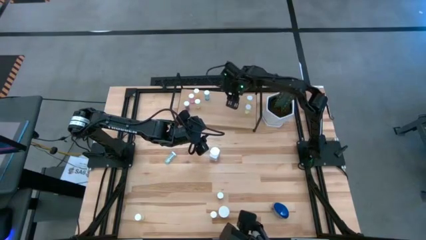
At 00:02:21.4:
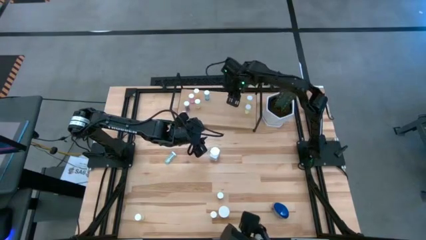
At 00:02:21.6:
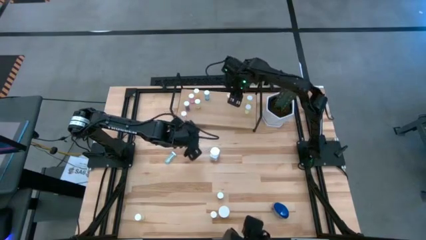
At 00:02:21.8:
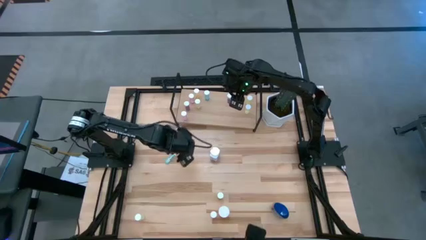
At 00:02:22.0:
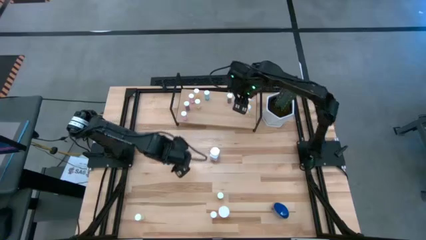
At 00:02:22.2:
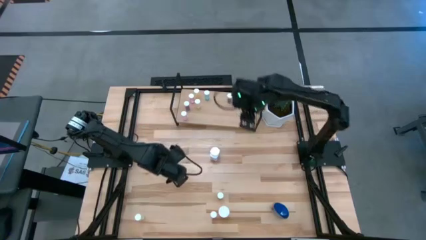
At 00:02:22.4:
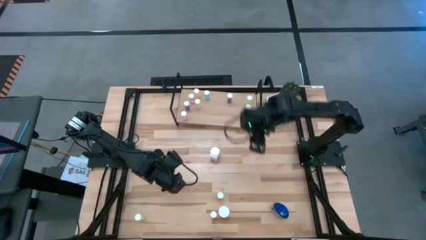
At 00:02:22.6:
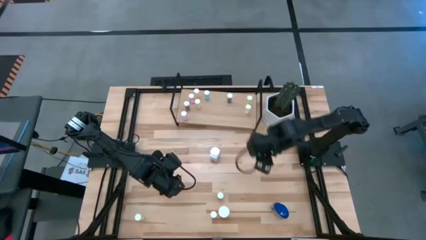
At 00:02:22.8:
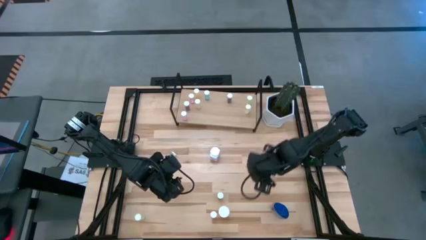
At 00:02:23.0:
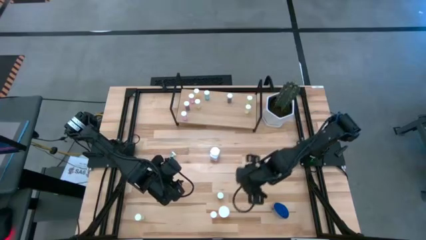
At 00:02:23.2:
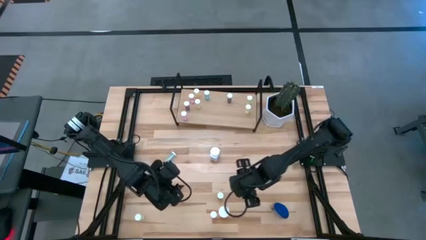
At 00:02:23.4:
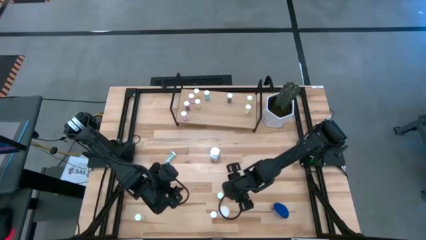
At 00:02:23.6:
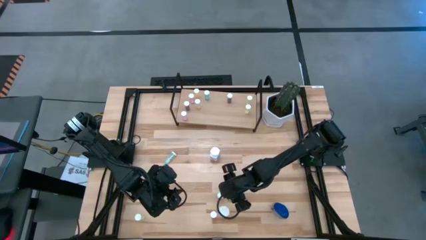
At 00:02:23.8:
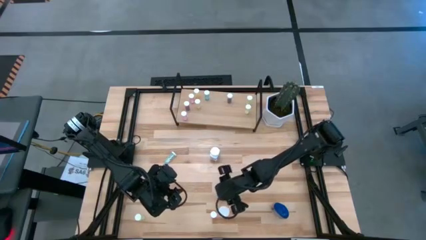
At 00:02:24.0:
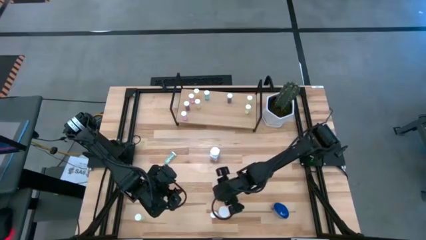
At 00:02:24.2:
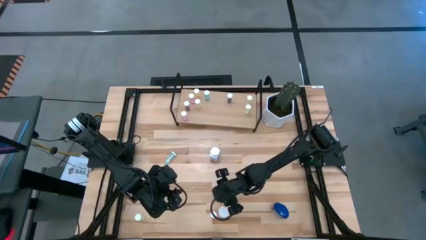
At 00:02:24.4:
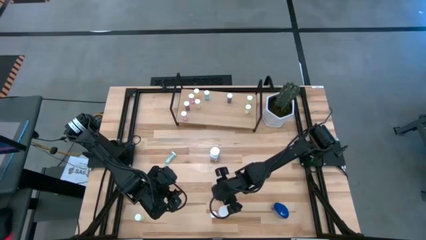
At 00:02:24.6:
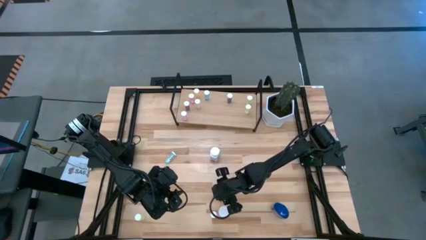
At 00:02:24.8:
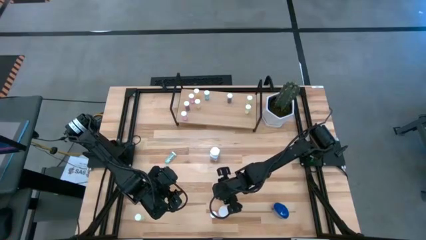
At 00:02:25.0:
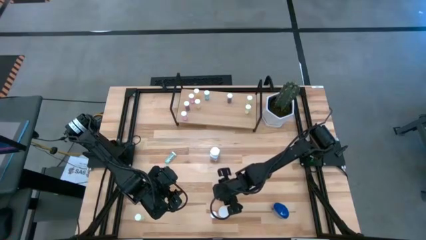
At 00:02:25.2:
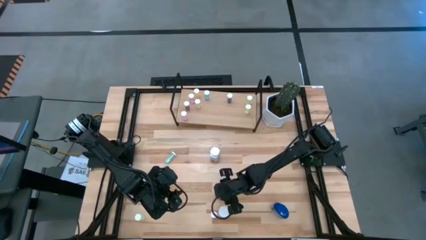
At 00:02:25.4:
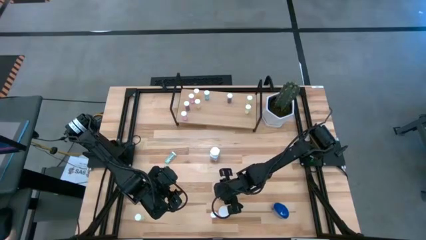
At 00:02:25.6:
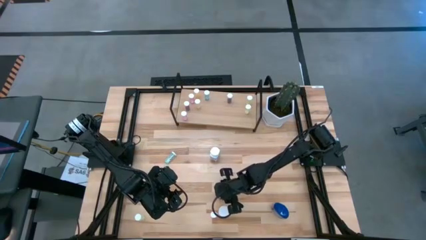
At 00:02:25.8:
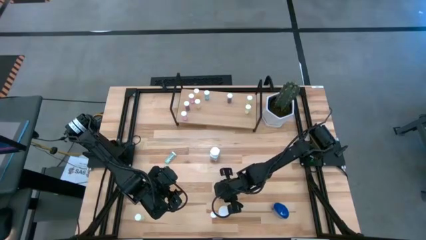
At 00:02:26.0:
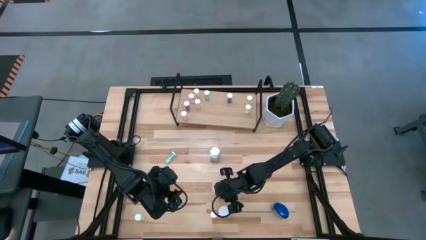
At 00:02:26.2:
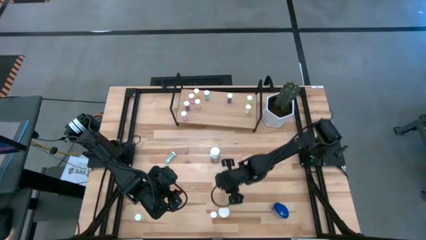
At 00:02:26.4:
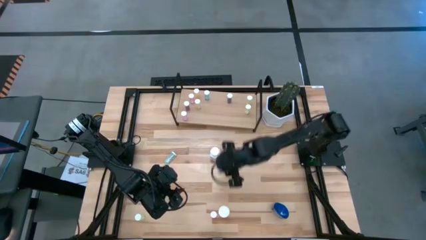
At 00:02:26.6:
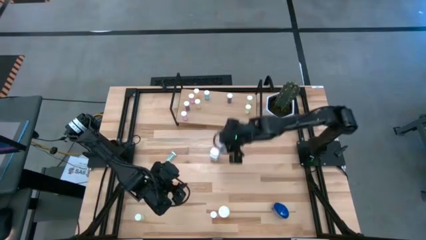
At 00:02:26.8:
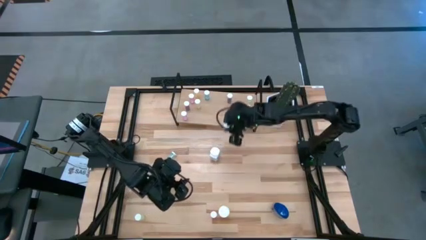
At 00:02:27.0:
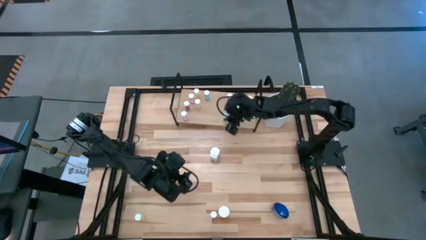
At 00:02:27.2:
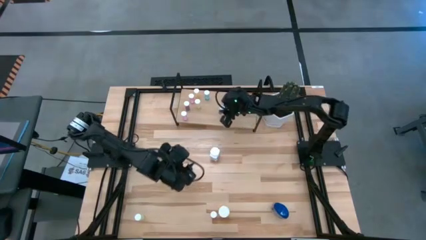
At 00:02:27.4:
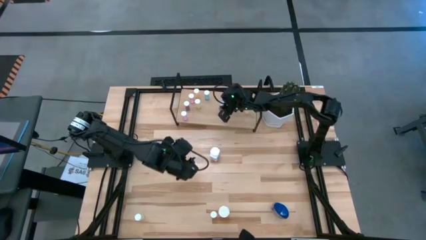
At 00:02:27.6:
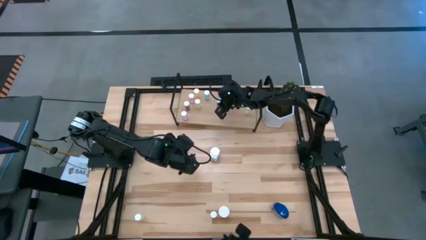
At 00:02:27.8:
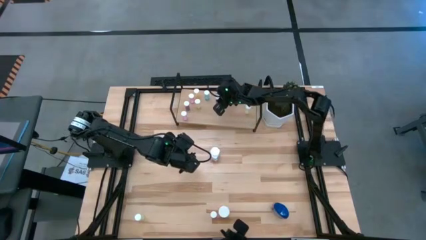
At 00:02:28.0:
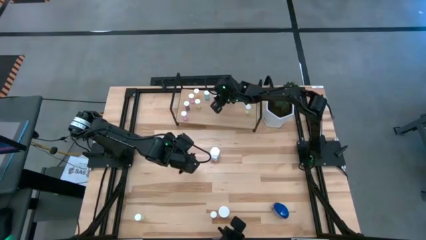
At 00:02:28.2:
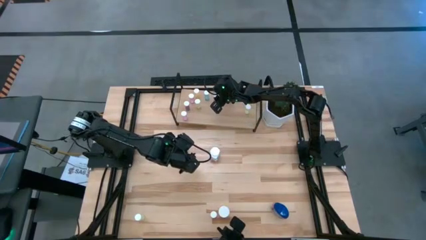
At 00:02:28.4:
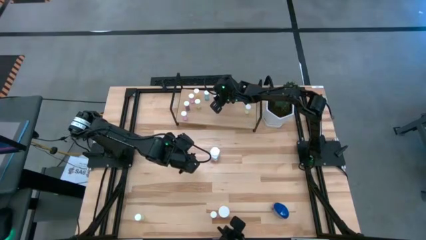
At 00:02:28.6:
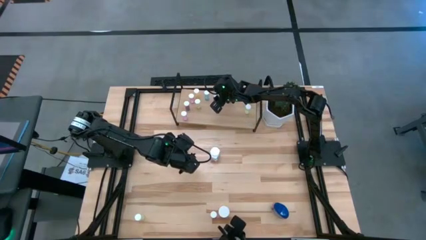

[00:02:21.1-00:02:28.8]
Task: Pick and place medicine bottles onto shelf by color
Put the blue pill bottle on the shelf

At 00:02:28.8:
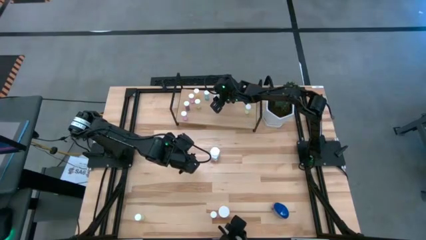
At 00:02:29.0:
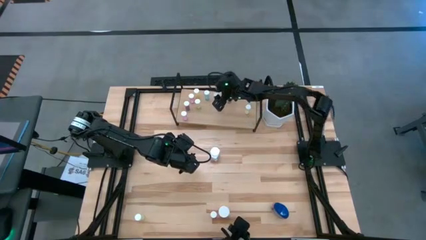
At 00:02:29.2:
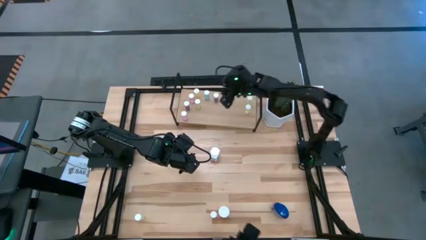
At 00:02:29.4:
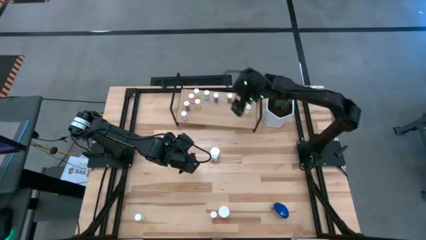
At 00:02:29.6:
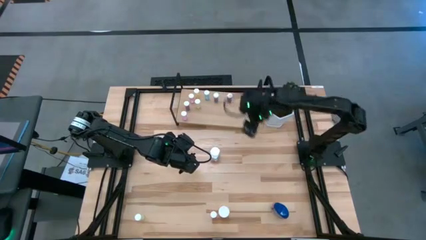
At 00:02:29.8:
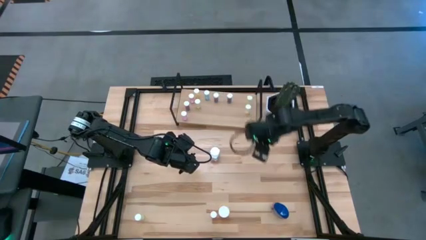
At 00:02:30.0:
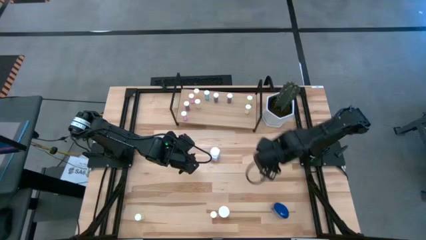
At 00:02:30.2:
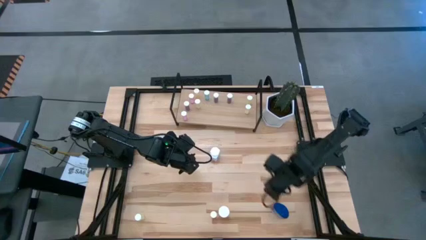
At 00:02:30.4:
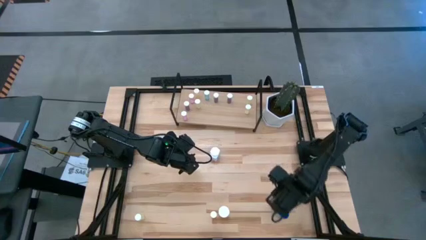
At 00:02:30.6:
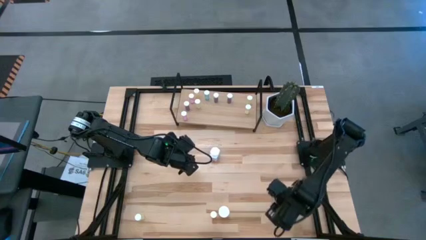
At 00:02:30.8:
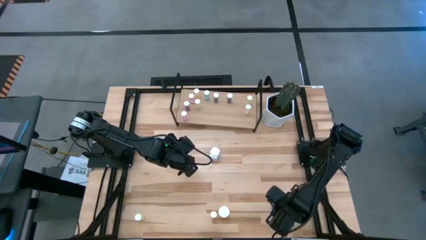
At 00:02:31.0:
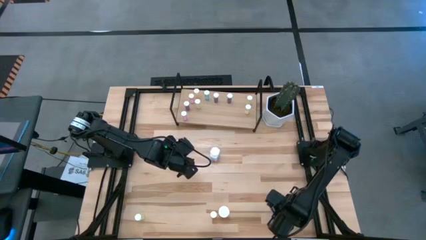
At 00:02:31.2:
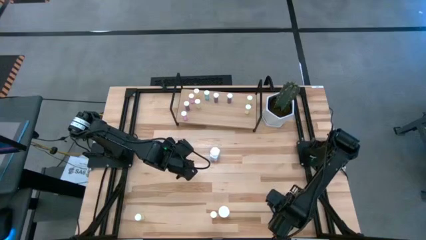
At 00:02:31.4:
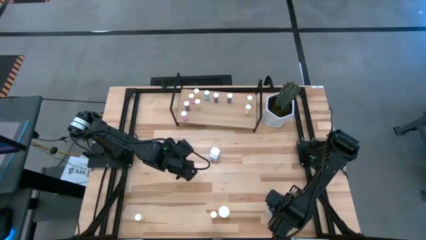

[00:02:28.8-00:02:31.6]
Put the dark blue pill bottle on the shelf
